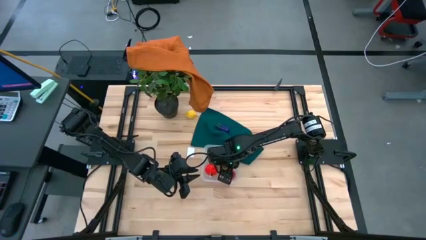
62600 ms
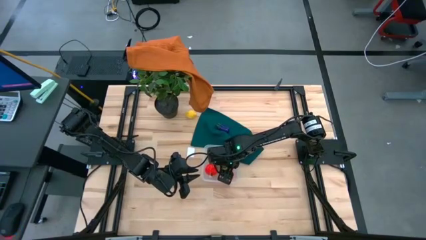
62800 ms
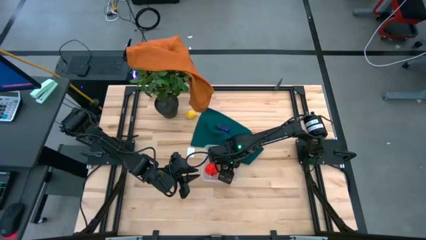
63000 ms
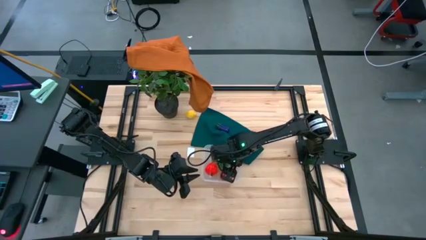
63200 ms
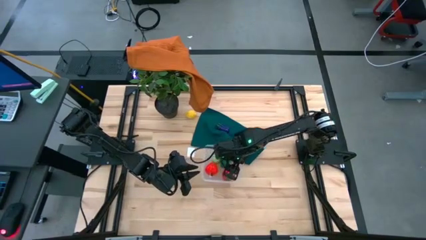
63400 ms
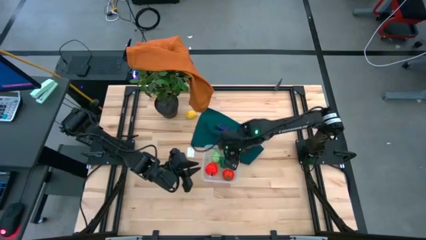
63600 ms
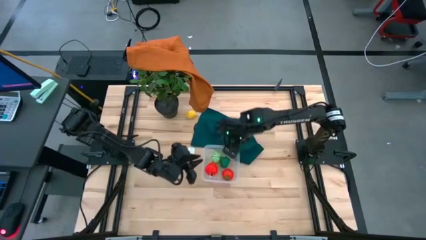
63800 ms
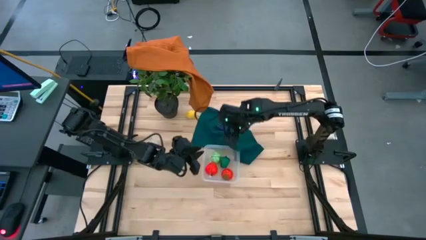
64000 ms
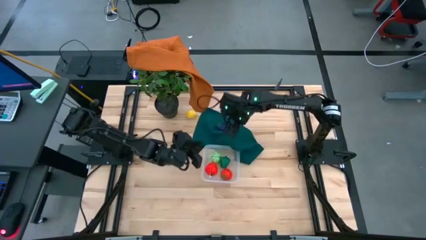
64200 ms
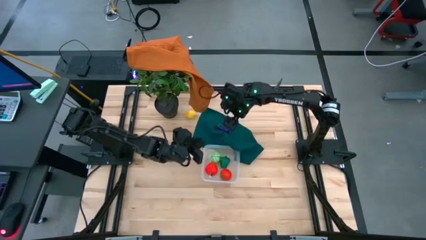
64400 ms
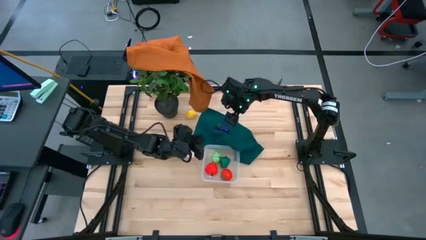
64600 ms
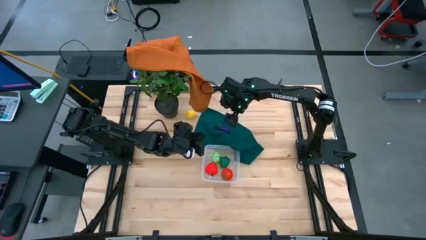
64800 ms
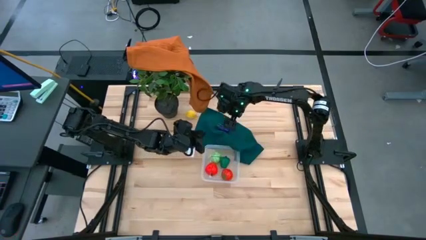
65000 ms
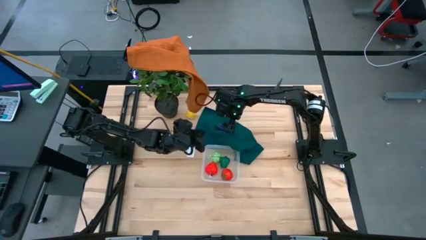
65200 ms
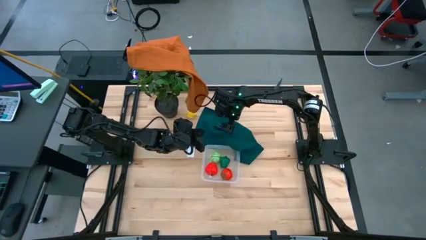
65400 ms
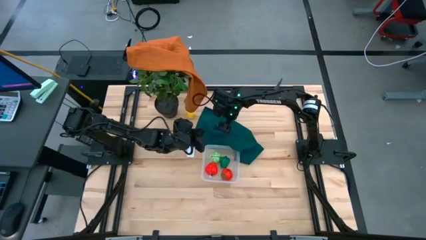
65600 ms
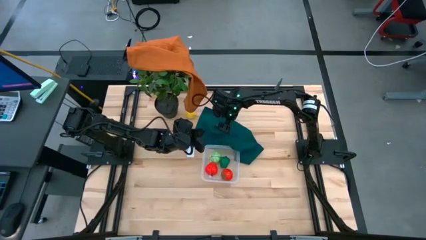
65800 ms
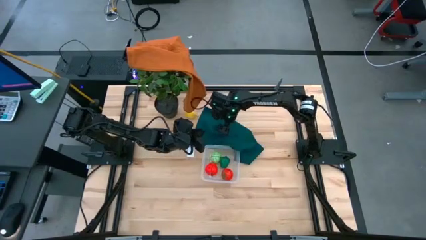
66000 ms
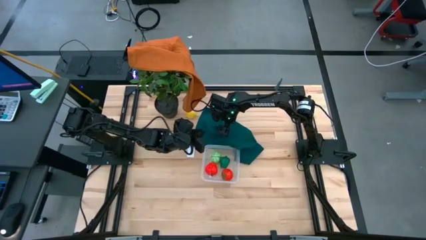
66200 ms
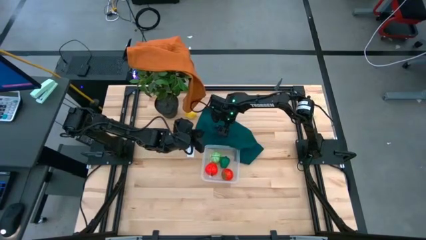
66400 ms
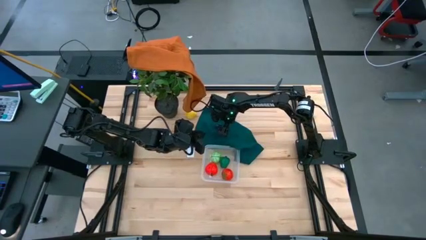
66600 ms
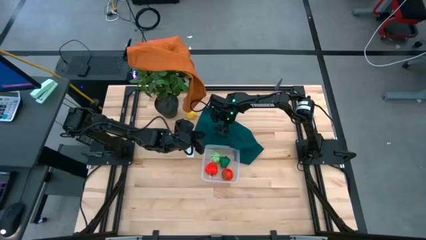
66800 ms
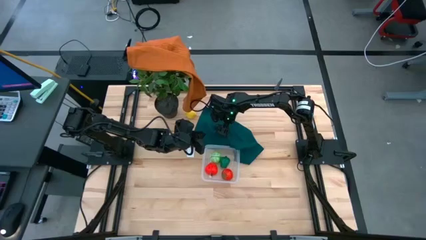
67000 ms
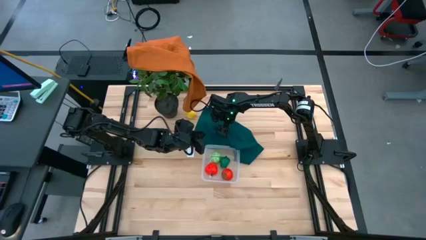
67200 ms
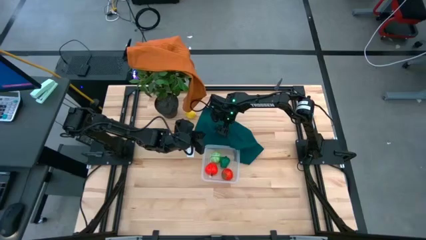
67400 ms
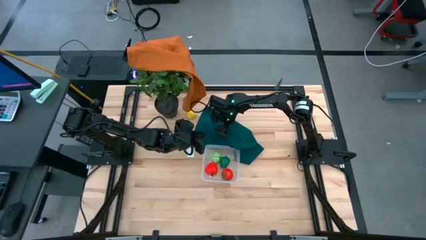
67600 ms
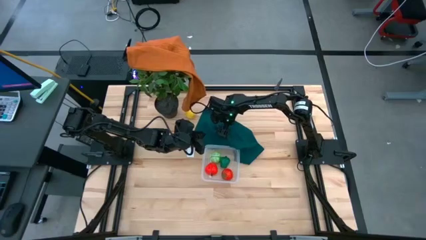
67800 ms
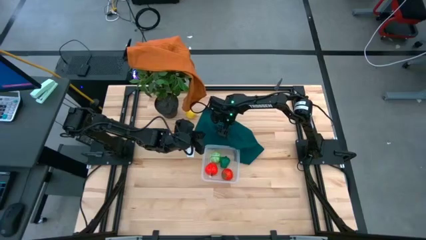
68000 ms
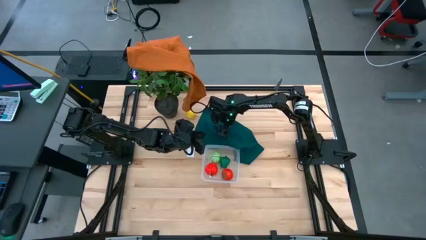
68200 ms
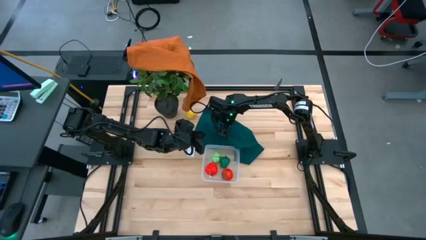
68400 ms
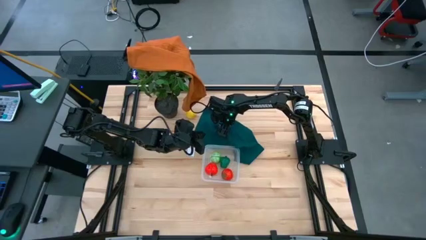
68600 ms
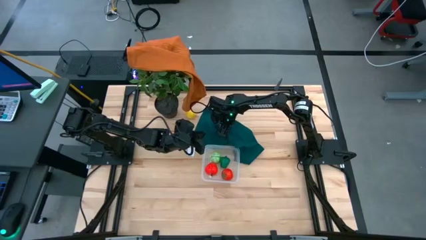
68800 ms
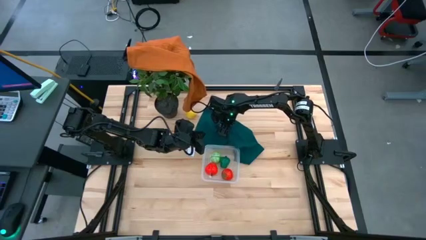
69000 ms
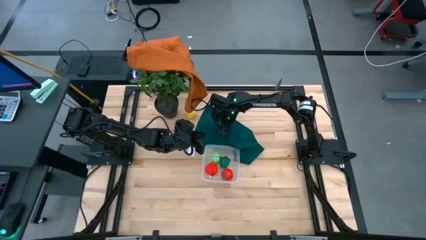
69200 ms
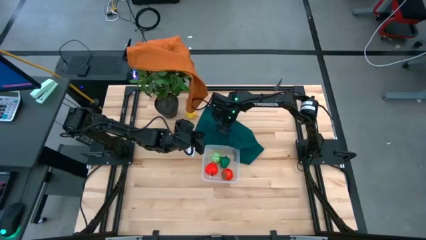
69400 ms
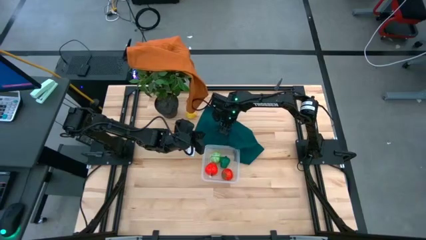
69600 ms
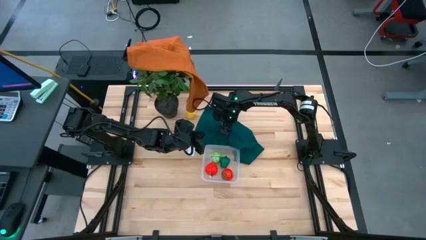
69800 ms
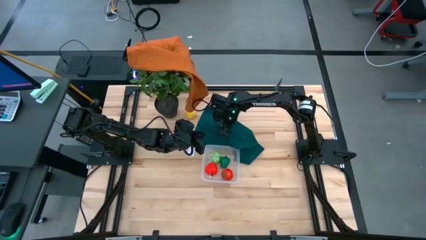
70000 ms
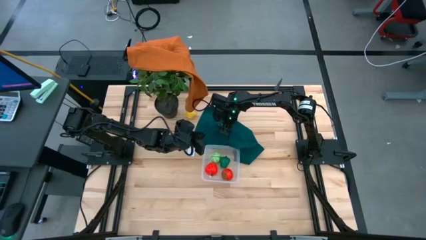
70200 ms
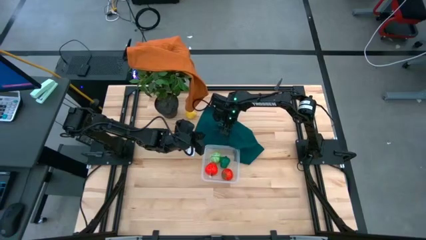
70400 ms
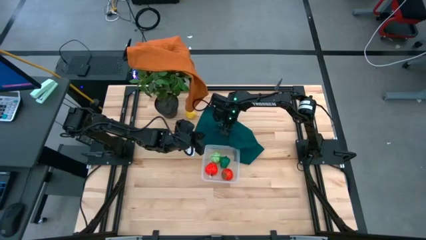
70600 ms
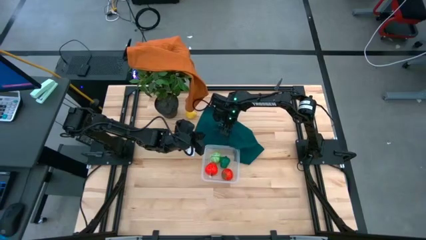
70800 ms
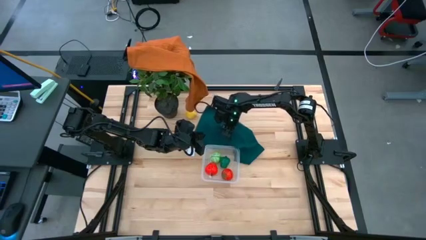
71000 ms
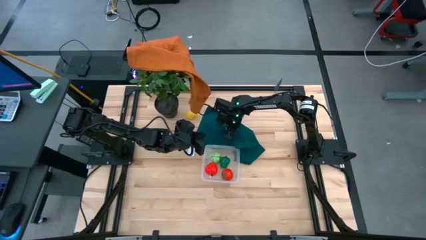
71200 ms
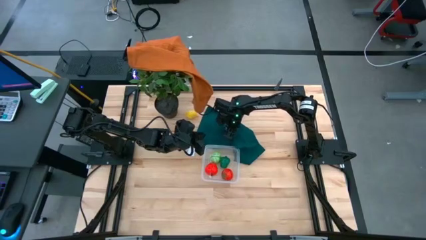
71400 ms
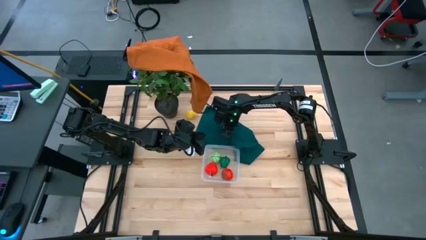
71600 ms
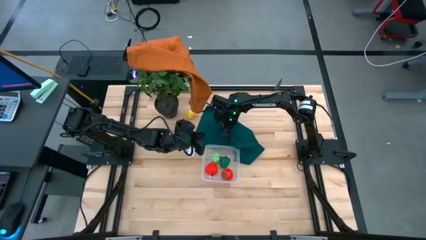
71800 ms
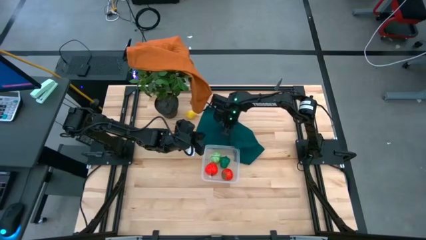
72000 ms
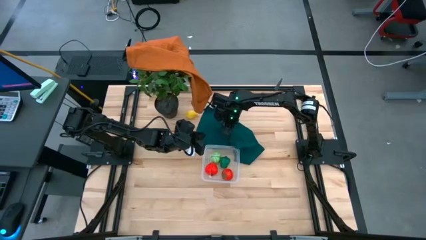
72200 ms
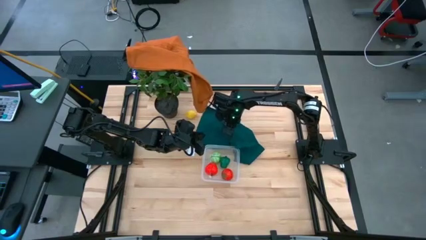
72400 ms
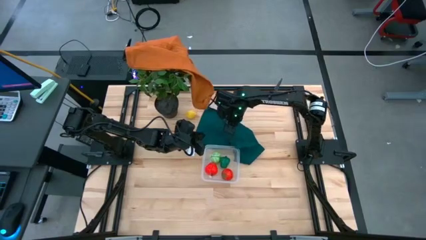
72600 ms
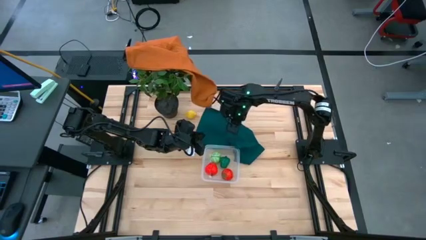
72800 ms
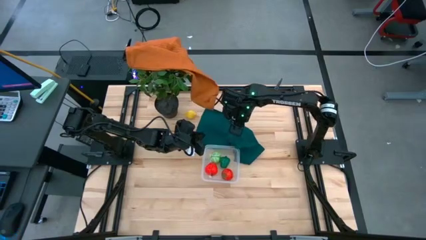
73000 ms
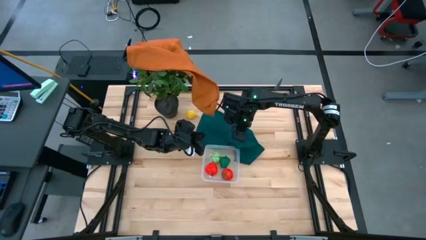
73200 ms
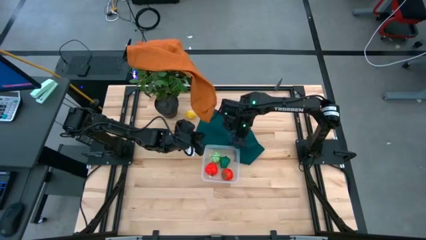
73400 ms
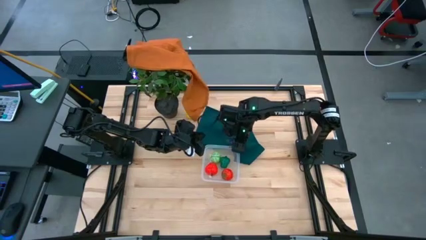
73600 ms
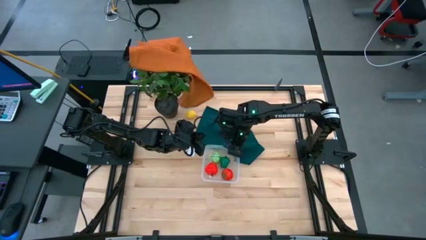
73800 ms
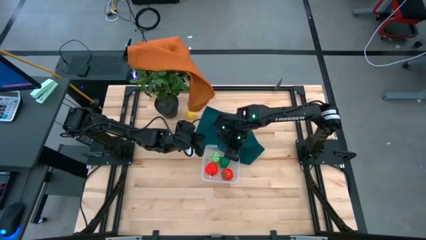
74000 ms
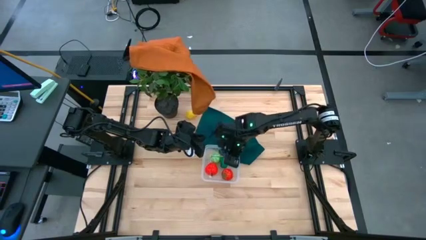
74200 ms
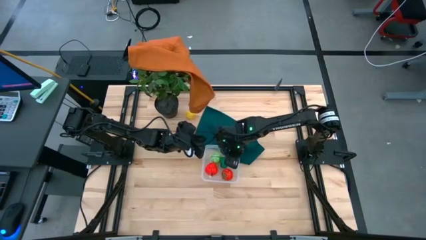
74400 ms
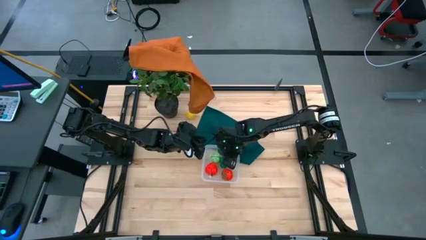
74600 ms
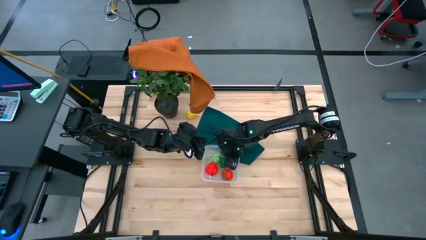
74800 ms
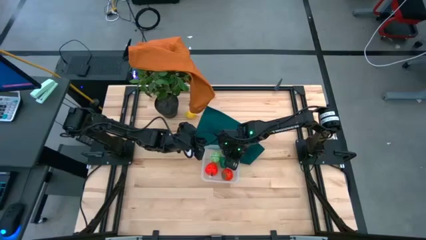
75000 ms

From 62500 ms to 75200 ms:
Task: Pick and placing Produce into tupperware
Put the eggplant into the transparent basket
